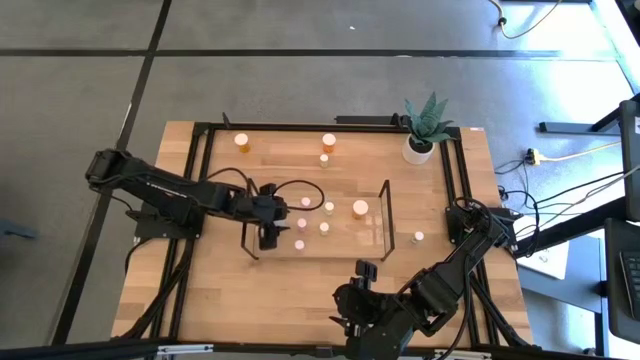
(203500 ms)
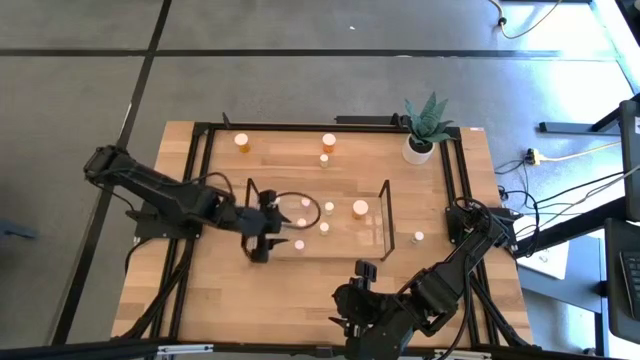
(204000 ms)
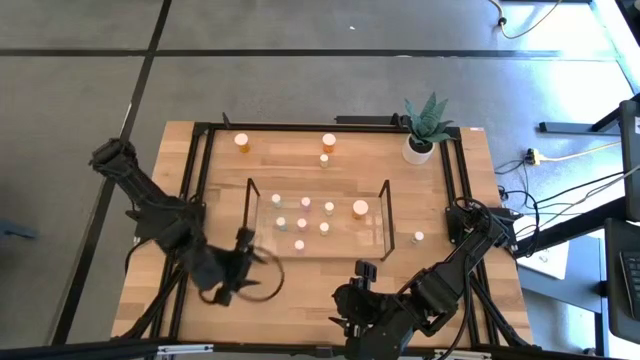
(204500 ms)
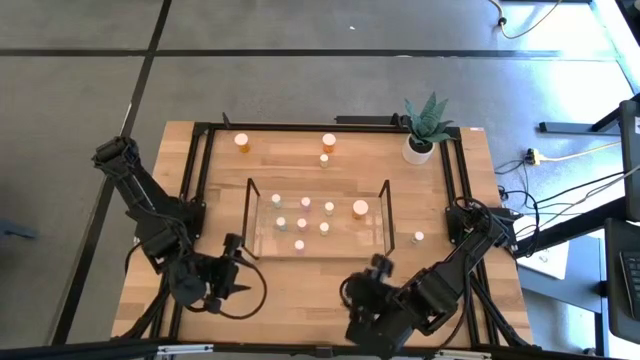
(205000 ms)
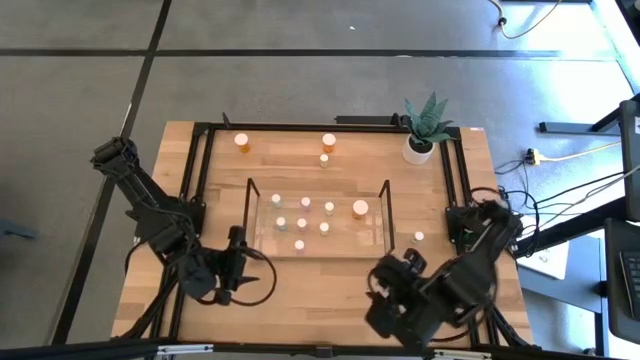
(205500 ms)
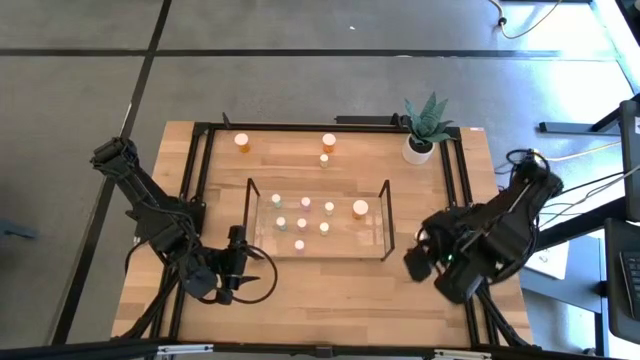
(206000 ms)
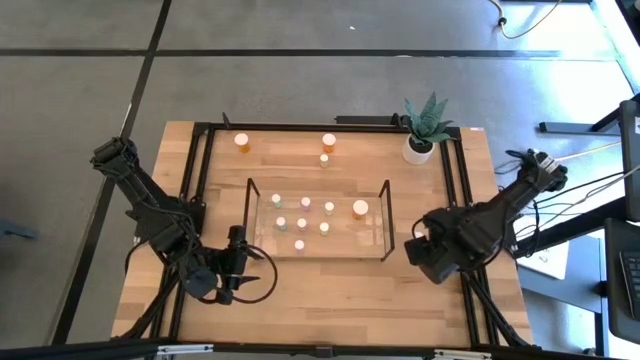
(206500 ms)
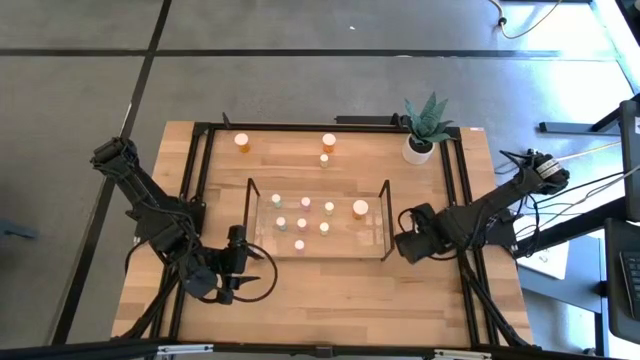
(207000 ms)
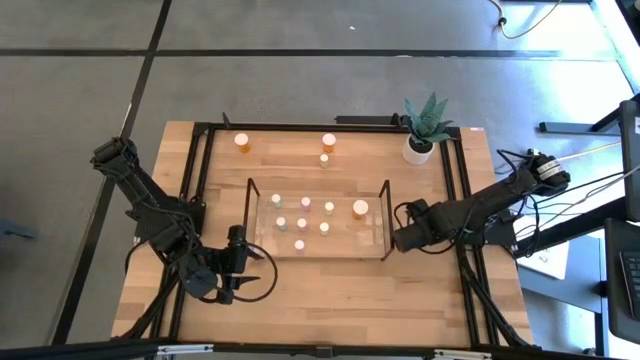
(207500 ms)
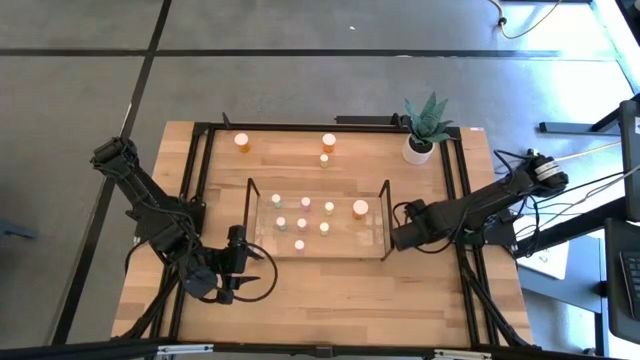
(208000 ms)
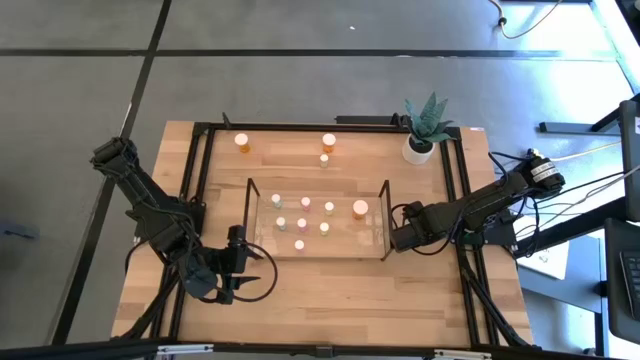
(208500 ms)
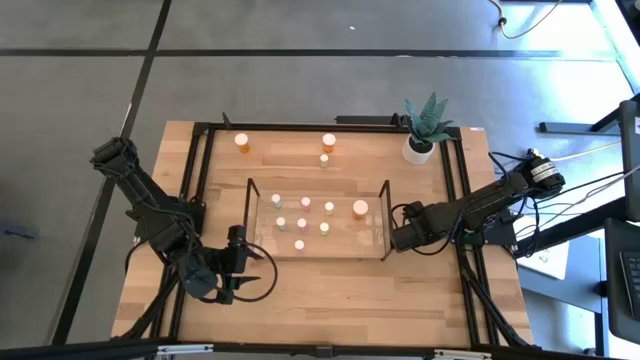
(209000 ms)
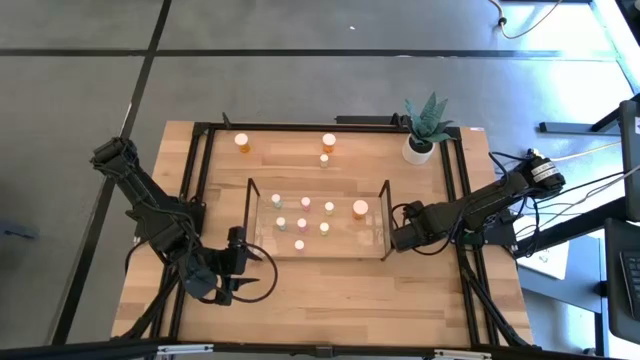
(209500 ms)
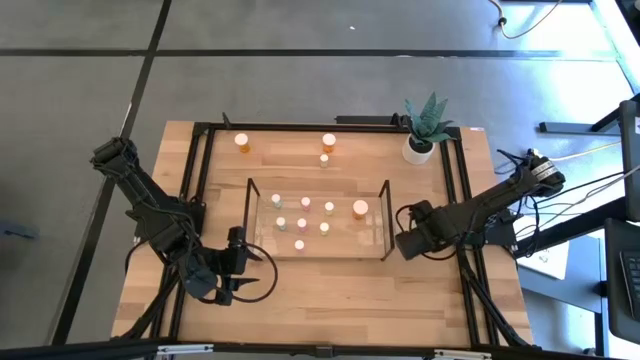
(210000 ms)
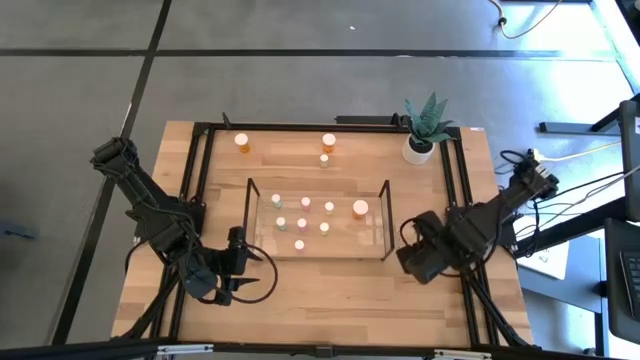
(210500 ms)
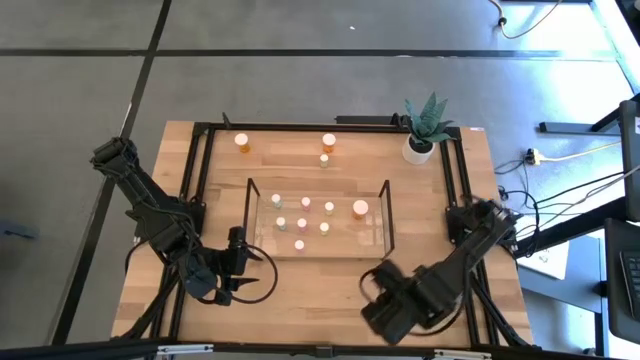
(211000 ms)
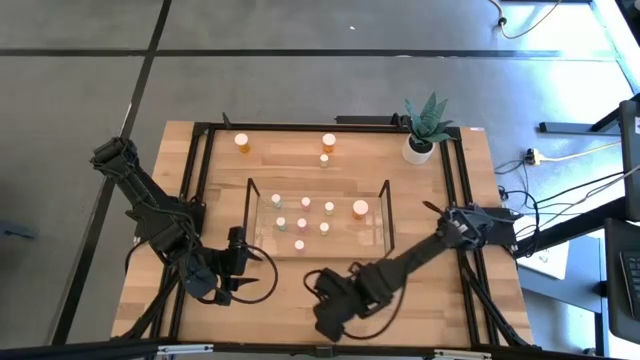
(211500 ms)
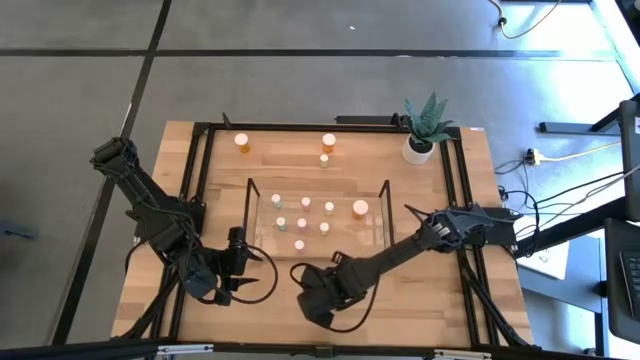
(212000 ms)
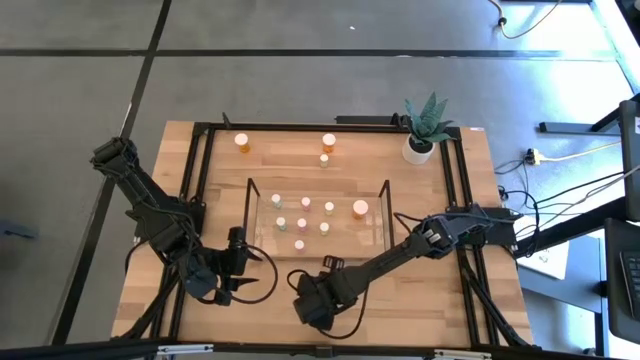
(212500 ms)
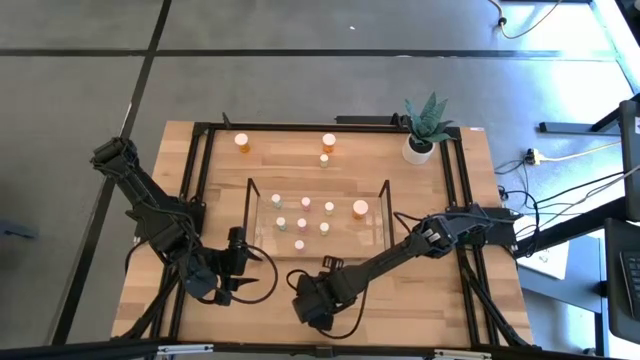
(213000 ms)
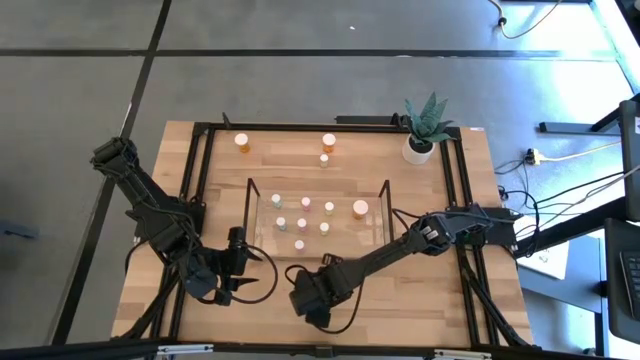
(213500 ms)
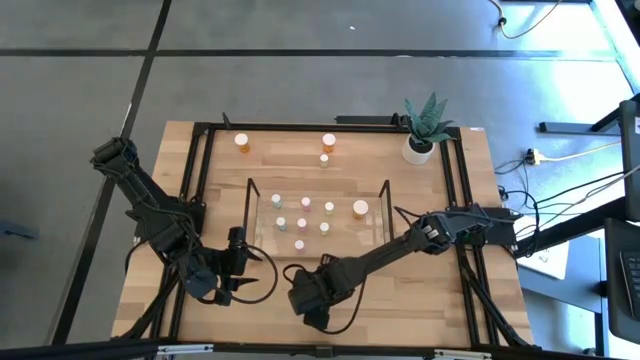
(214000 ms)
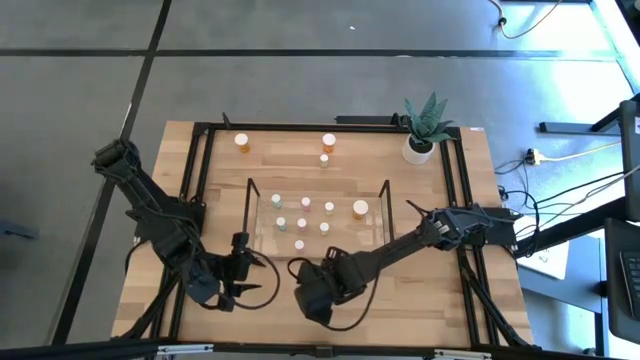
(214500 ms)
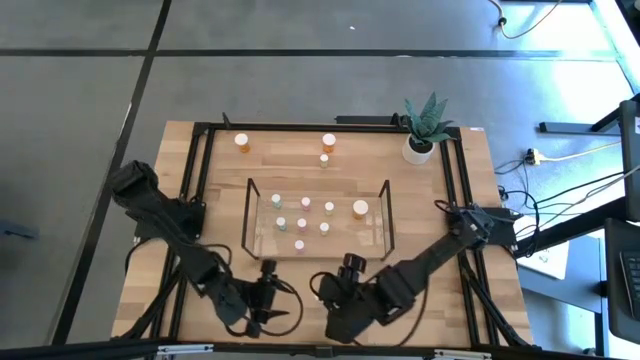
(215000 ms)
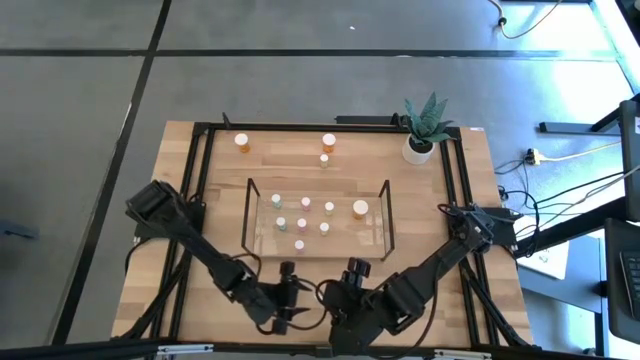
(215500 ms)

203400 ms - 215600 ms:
Task: Pick and place medicine bottles onto shelf by color
Put the blue pill bottle on the shelf aligned with the other blue pill bottles

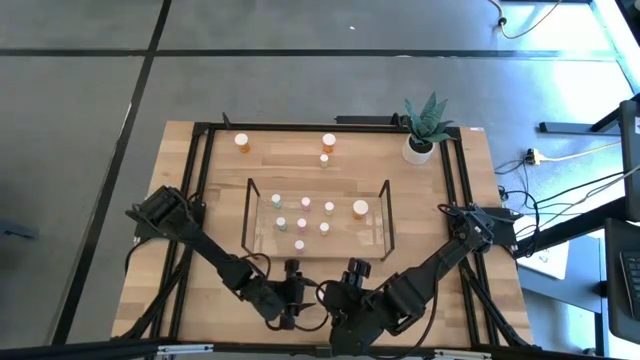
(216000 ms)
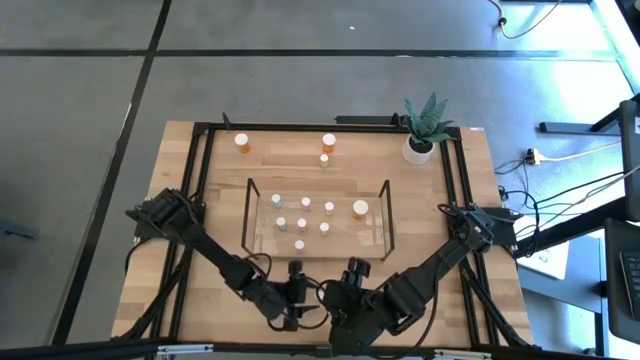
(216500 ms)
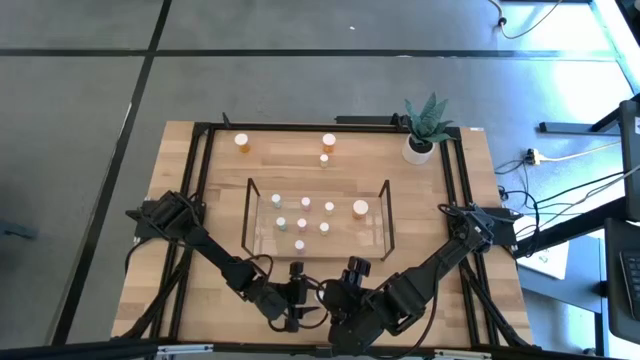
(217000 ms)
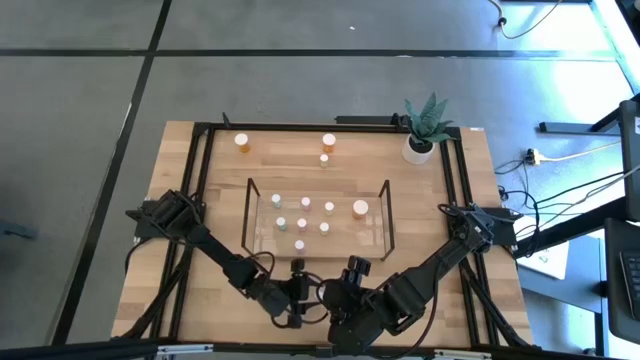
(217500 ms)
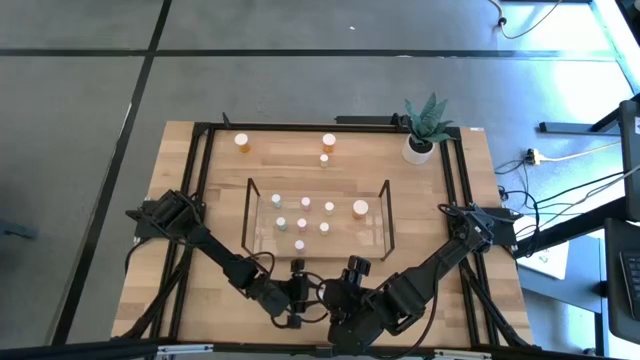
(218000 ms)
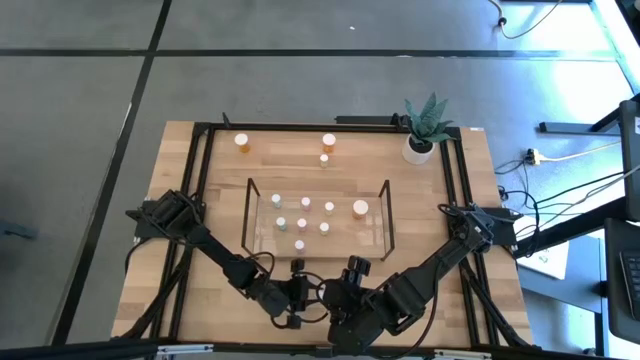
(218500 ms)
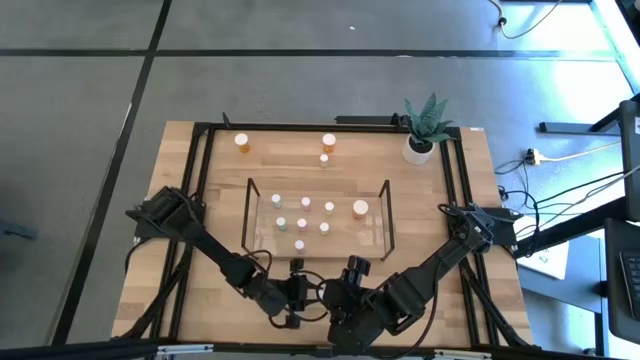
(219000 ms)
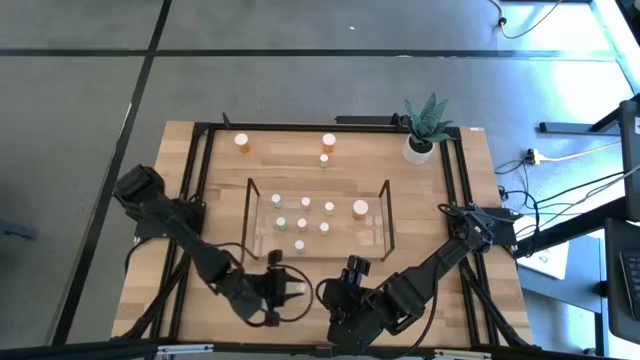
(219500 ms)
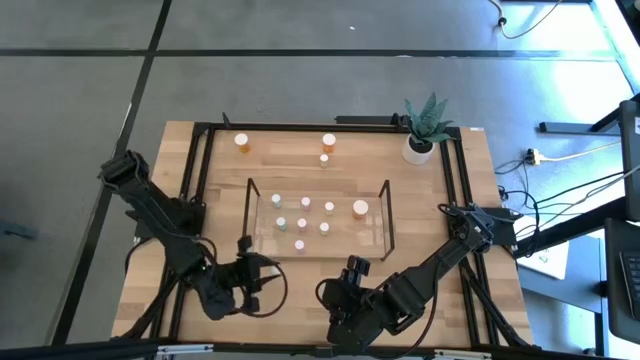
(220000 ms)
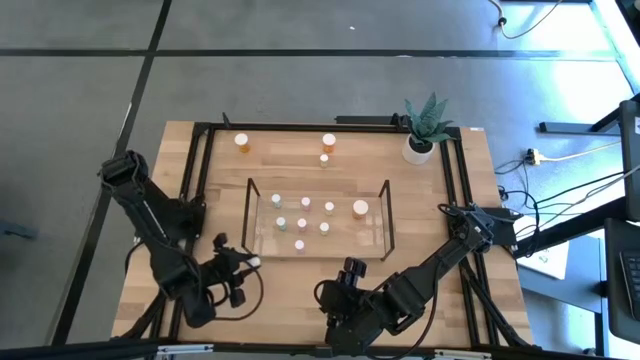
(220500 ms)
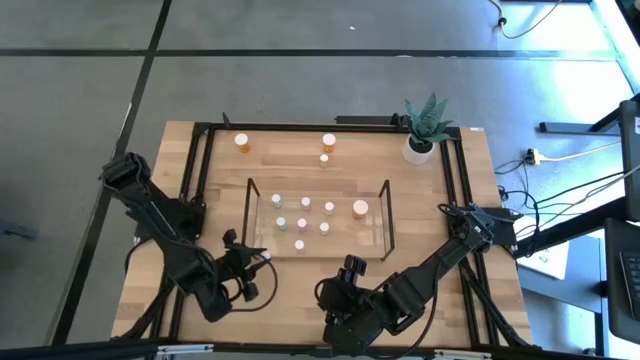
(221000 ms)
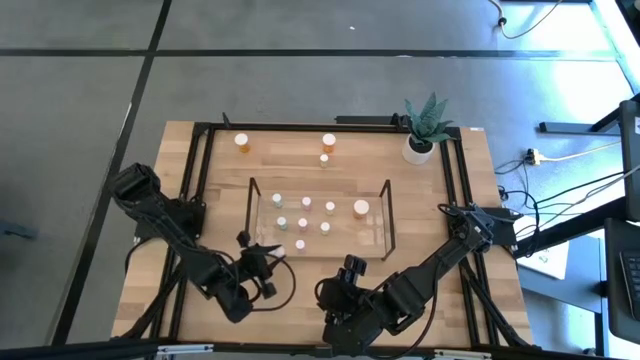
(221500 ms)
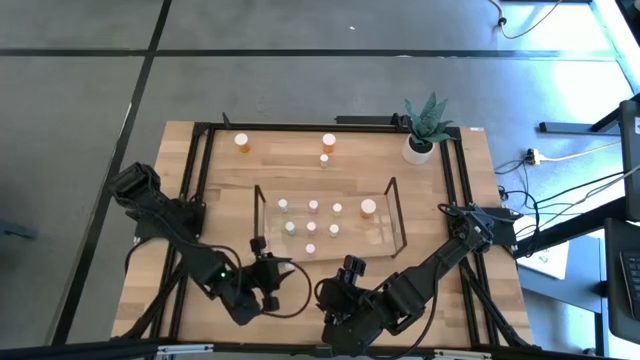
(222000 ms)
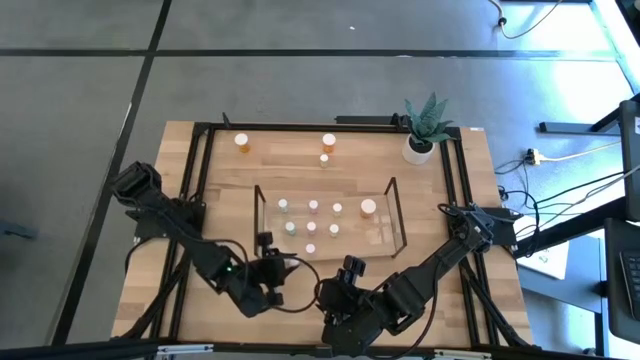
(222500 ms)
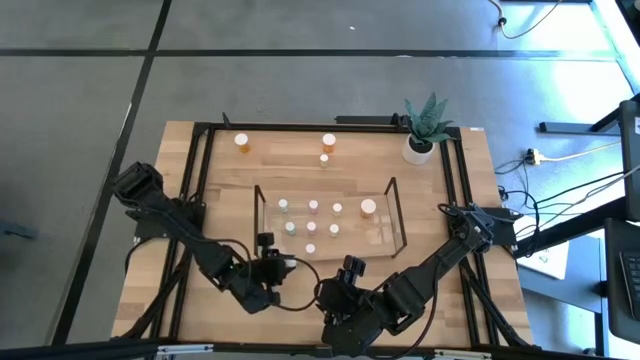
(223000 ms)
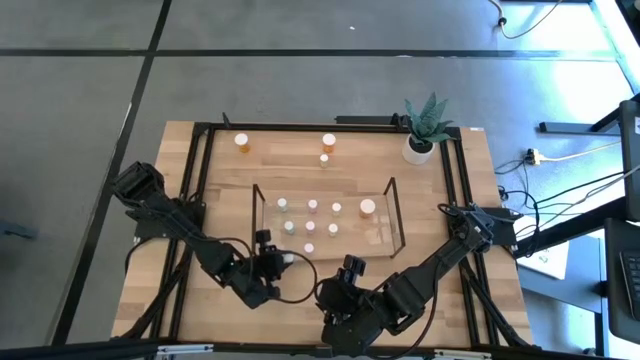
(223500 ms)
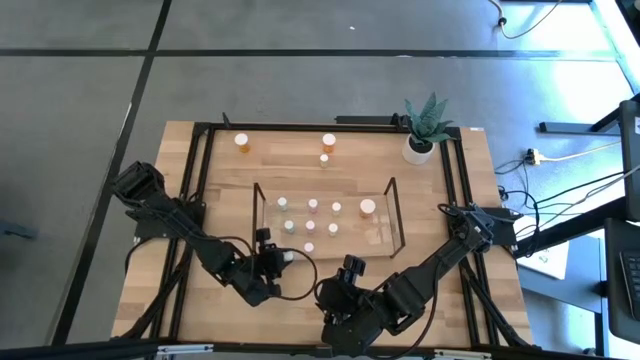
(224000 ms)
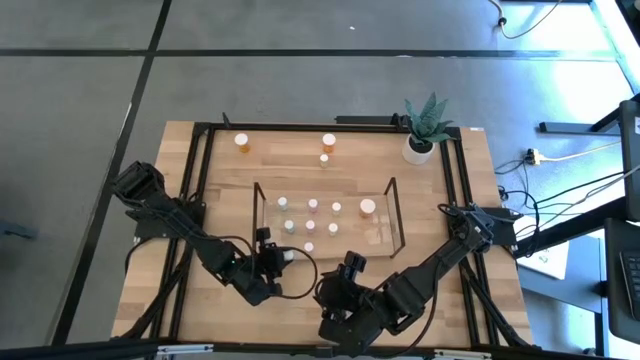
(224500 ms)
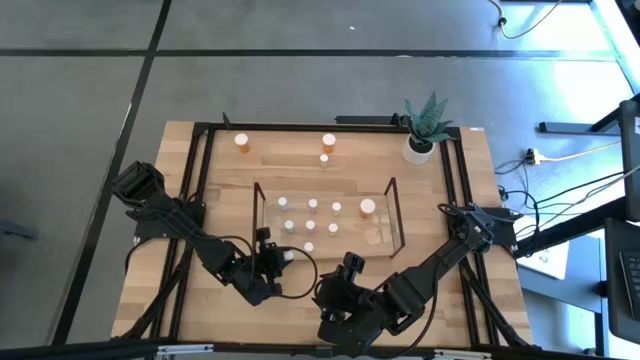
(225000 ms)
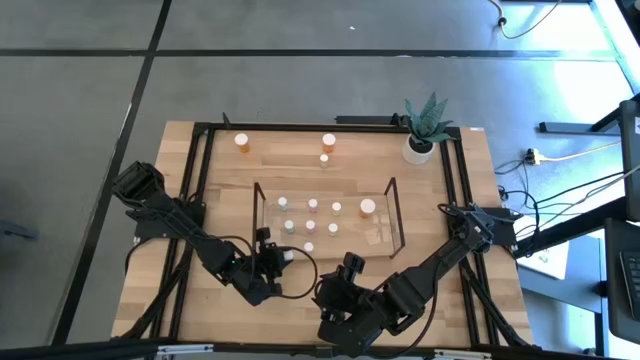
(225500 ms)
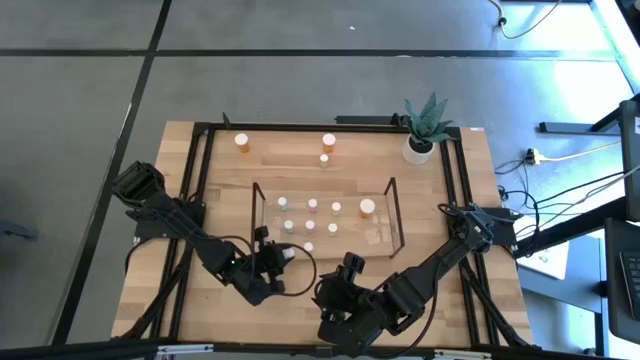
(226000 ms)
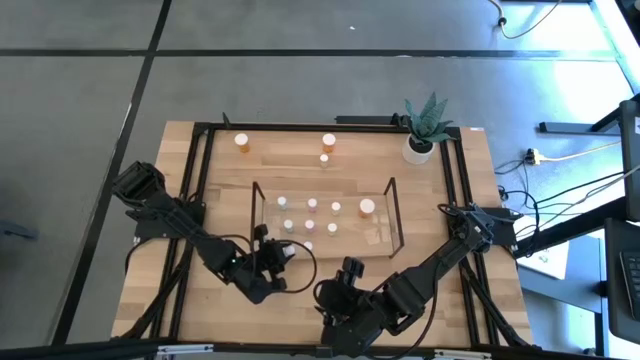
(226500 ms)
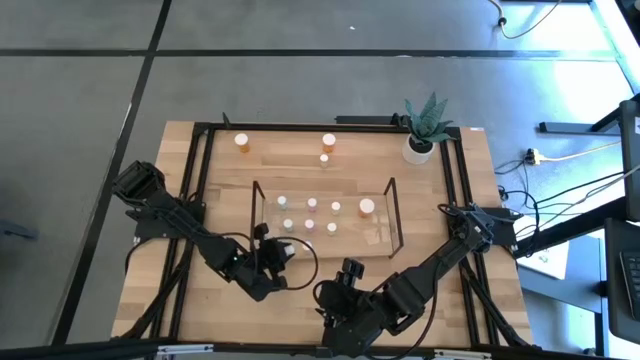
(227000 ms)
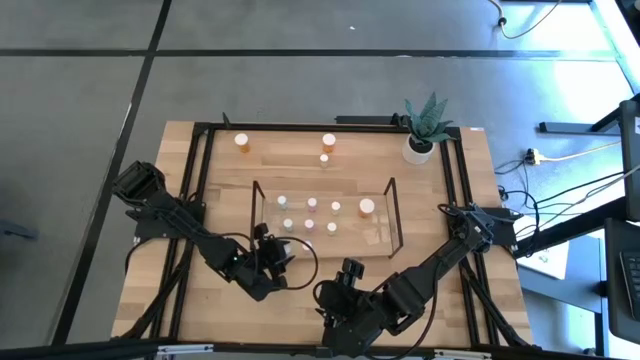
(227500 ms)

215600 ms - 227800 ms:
Put the blue pill bottle on the shelf aligned with the other blue pill bottles
